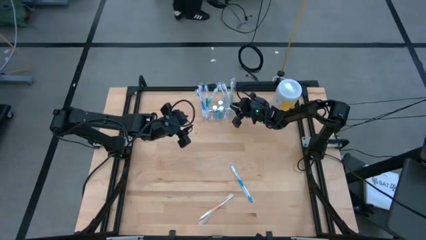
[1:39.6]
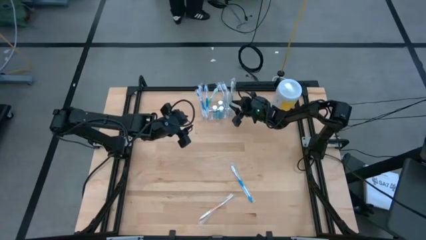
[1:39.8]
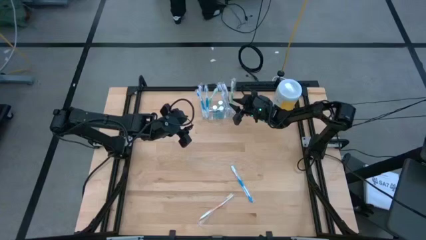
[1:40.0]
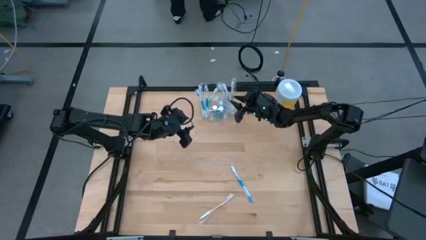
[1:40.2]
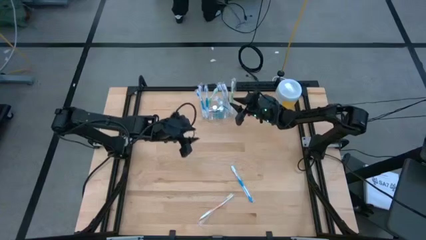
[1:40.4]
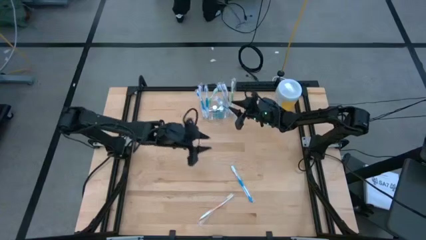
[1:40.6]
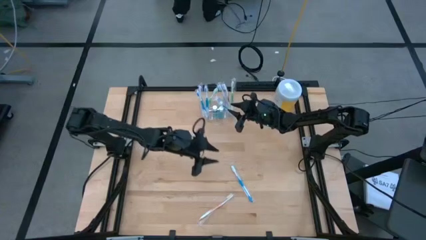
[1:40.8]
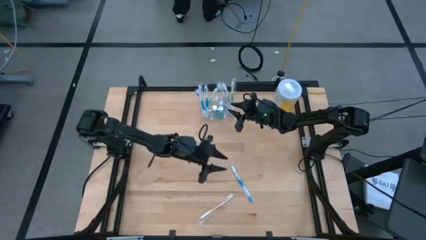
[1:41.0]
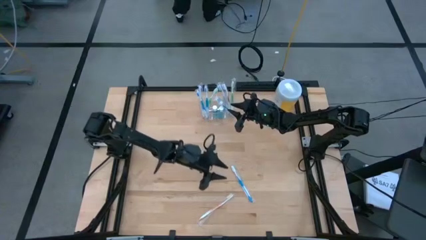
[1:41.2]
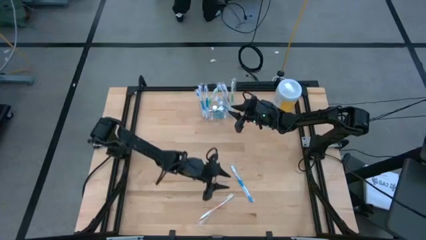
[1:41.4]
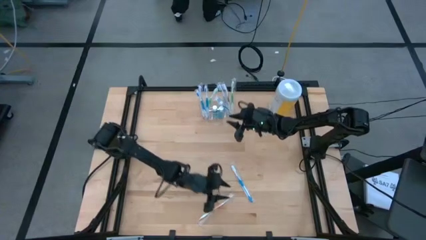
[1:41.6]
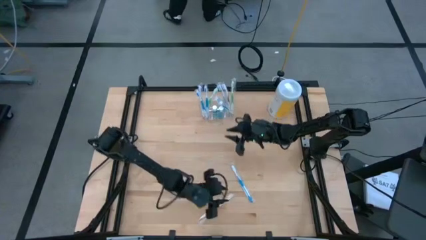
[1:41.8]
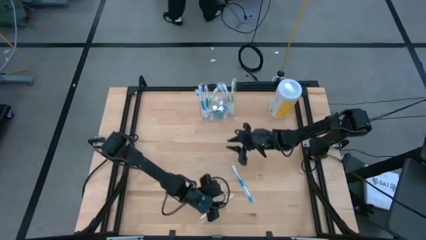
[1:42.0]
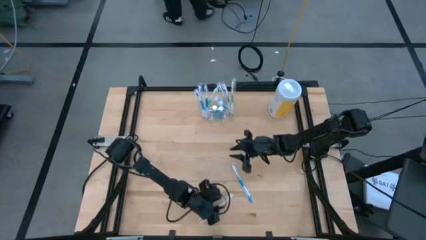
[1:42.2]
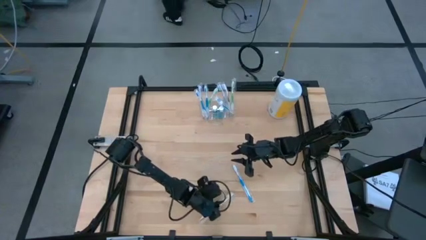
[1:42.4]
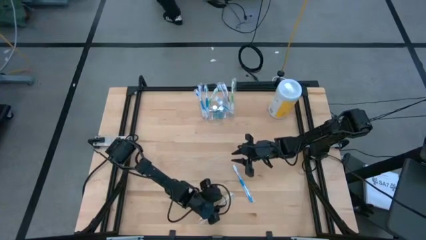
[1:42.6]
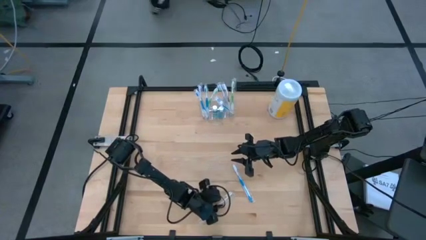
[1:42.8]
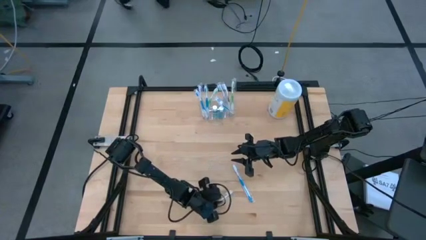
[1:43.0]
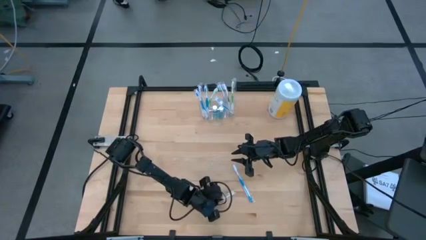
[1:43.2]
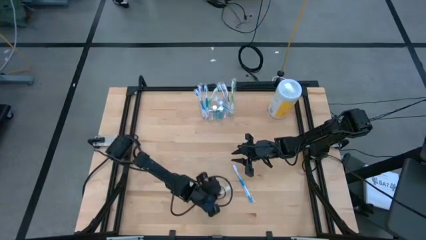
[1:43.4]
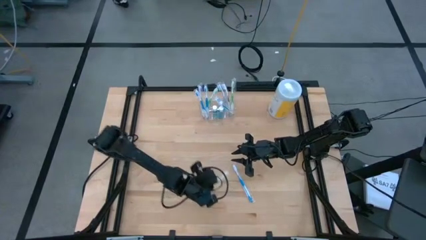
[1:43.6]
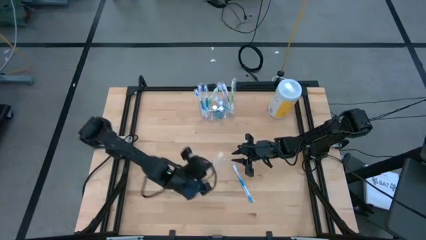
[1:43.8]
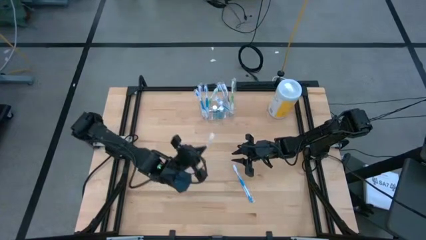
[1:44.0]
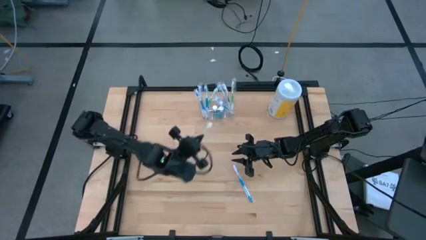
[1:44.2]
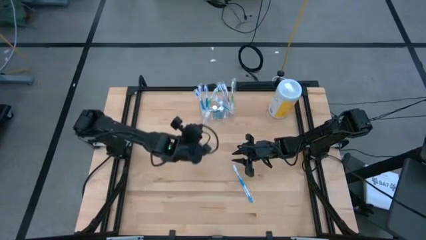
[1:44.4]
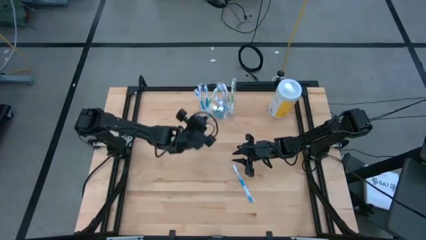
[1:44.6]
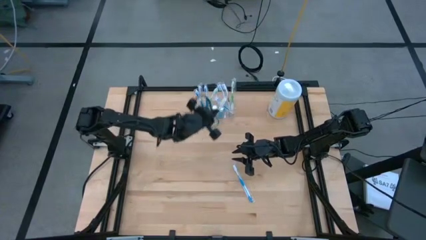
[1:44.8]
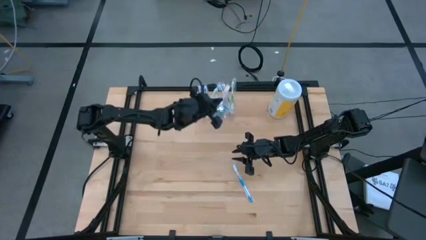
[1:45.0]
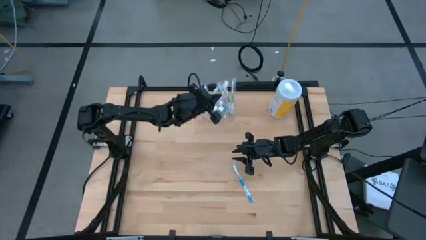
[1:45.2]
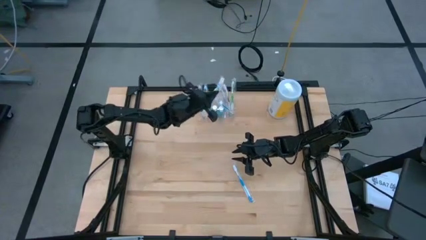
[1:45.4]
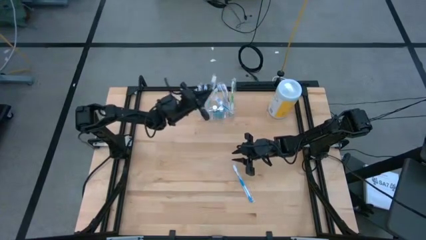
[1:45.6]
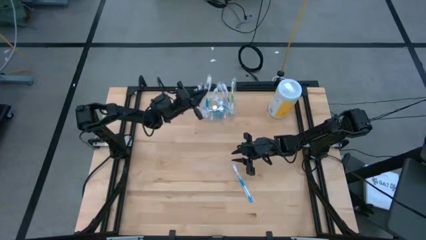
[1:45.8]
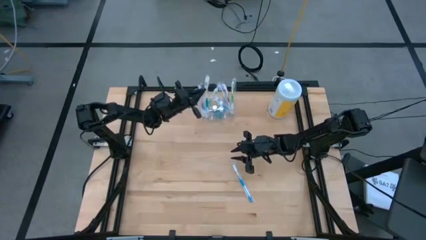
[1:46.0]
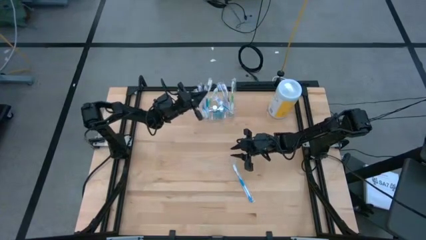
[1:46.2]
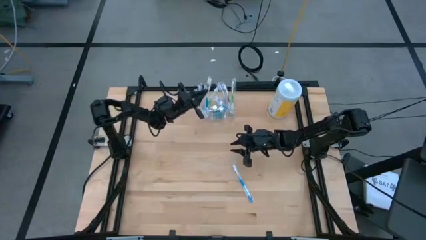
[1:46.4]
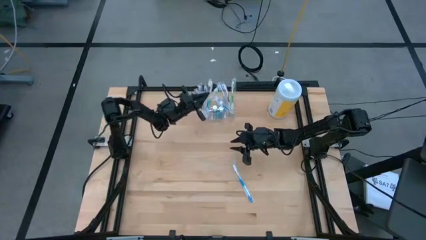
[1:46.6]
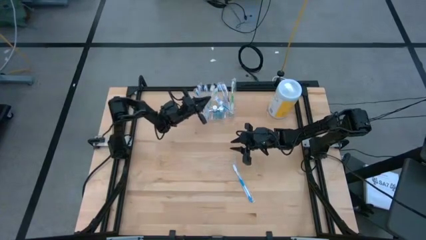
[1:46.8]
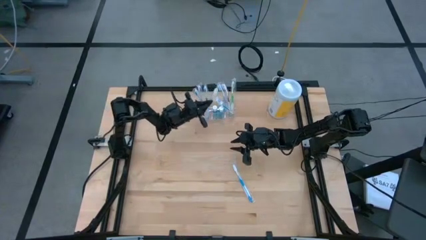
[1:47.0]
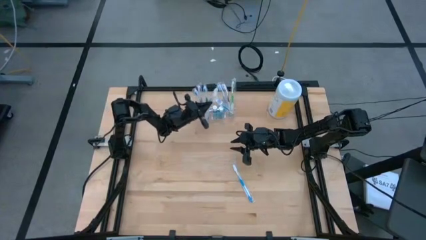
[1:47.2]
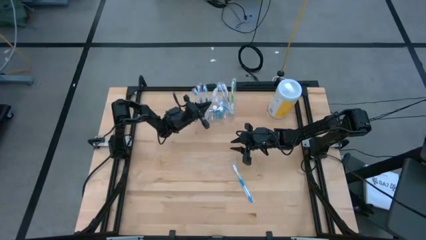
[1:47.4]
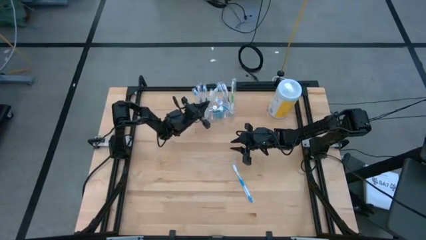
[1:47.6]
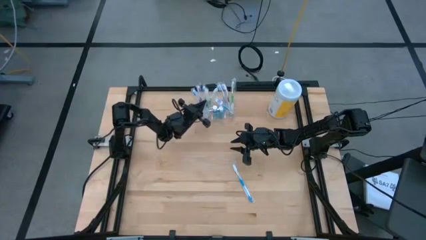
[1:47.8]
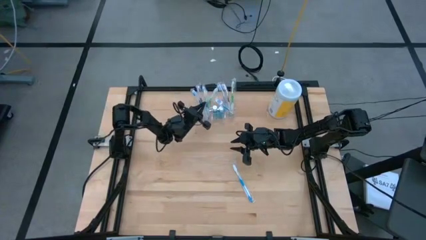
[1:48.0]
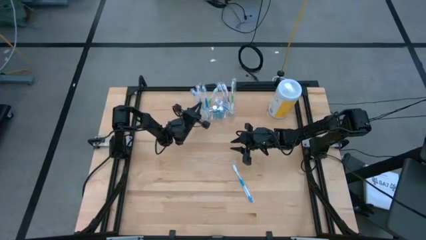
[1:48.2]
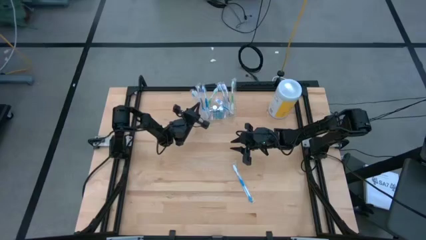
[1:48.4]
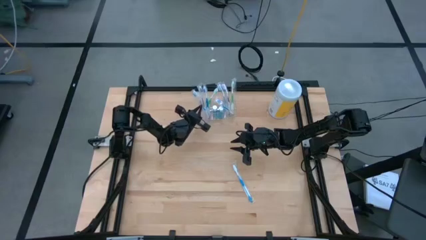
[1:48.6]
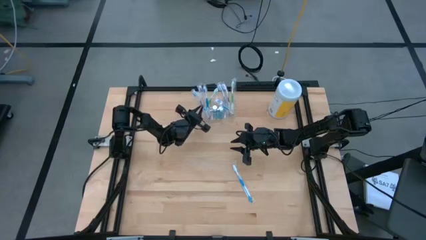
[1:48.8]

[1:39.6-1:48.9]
Task: Pick & Place toothbrushing station
Put the orange toothbrush into the transparent organizer

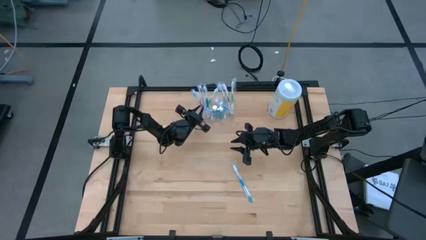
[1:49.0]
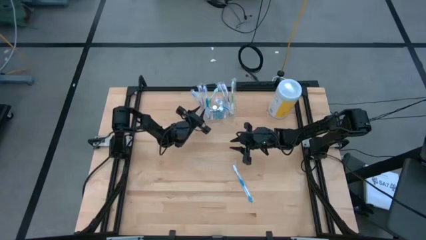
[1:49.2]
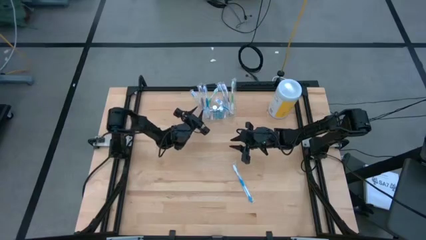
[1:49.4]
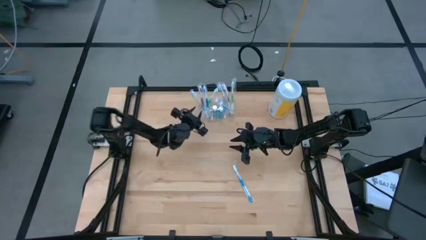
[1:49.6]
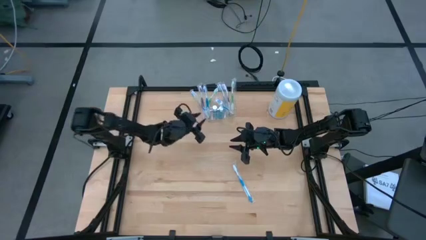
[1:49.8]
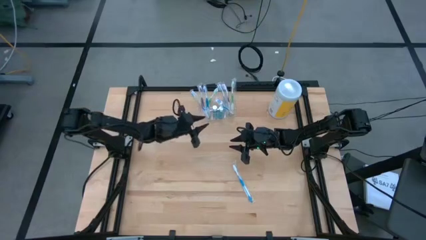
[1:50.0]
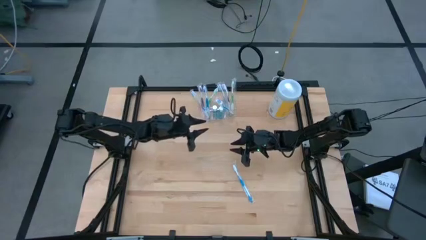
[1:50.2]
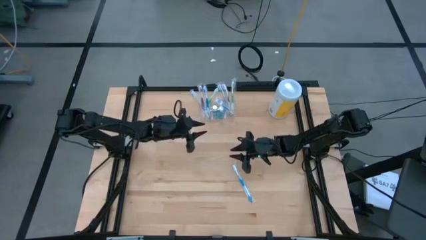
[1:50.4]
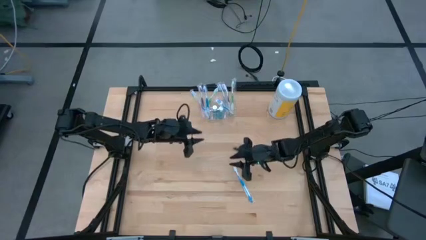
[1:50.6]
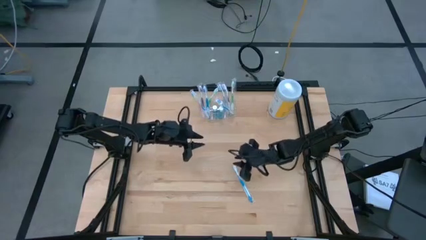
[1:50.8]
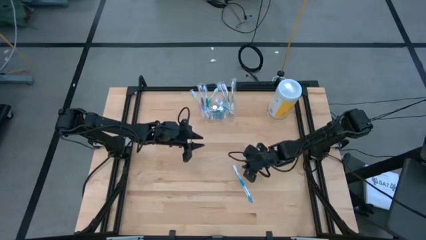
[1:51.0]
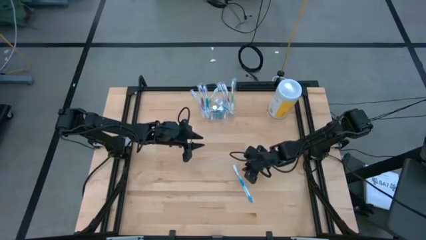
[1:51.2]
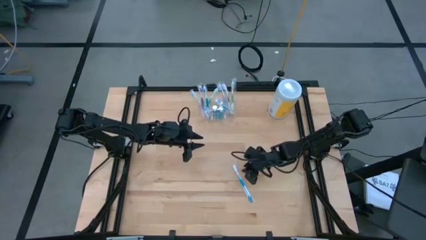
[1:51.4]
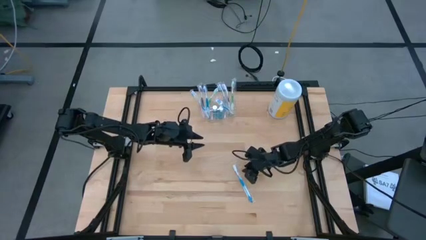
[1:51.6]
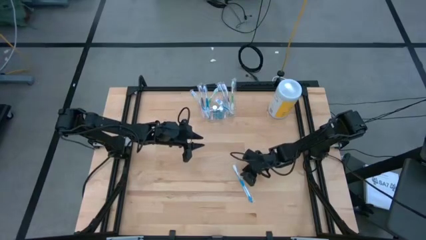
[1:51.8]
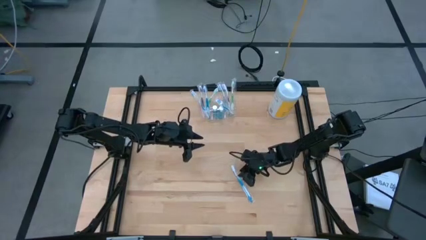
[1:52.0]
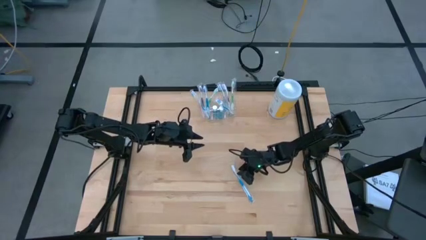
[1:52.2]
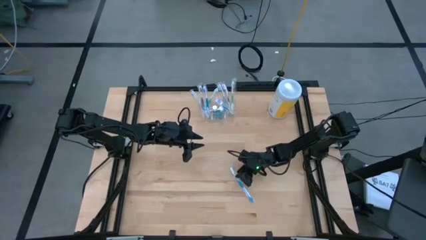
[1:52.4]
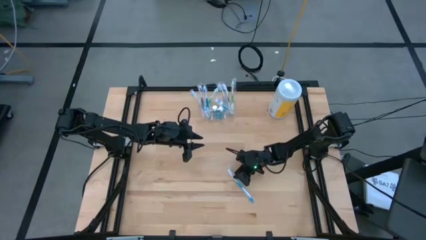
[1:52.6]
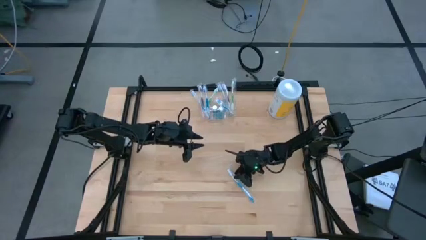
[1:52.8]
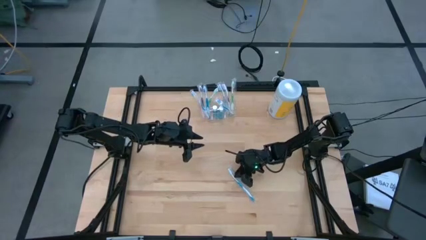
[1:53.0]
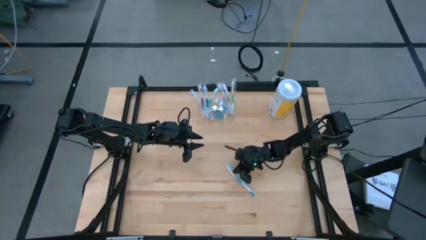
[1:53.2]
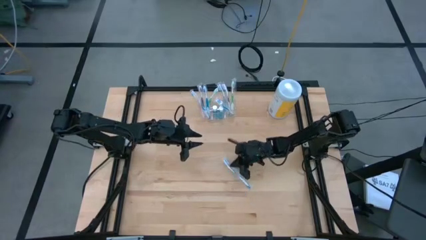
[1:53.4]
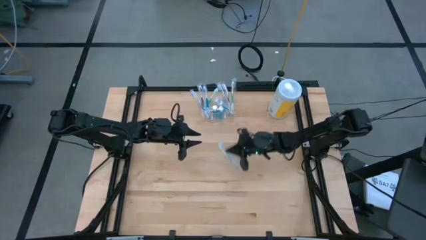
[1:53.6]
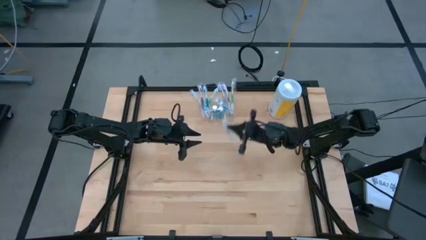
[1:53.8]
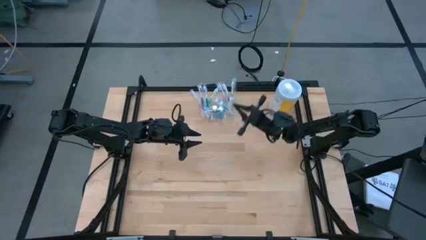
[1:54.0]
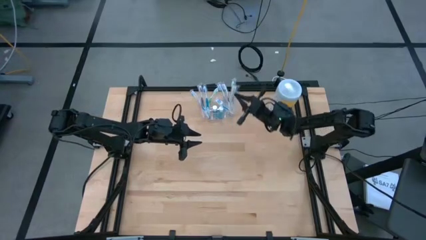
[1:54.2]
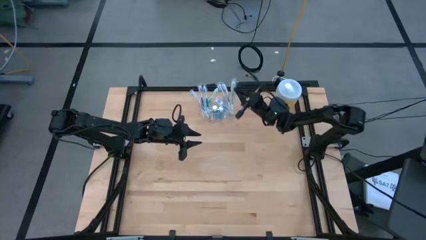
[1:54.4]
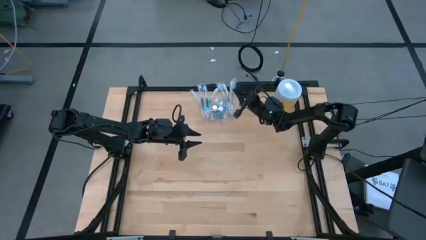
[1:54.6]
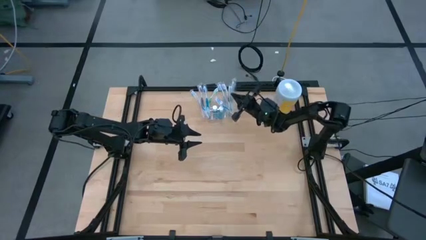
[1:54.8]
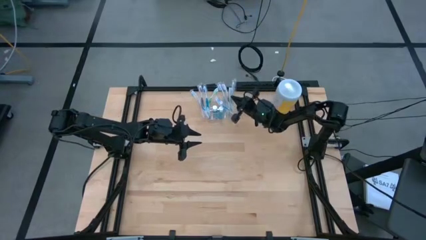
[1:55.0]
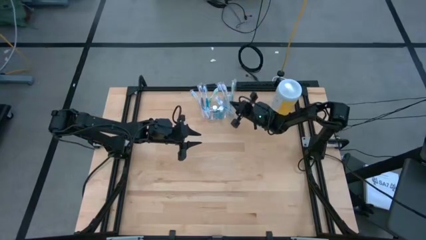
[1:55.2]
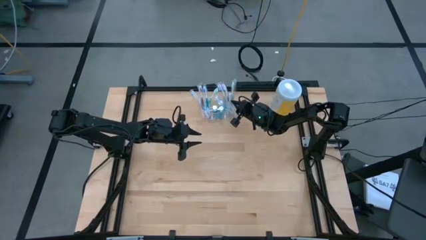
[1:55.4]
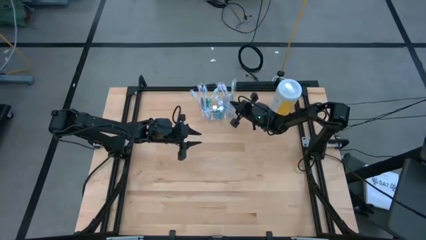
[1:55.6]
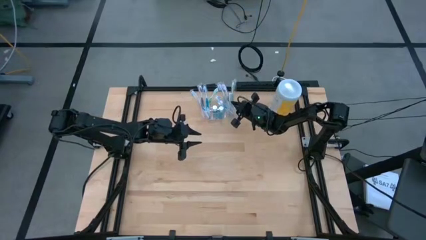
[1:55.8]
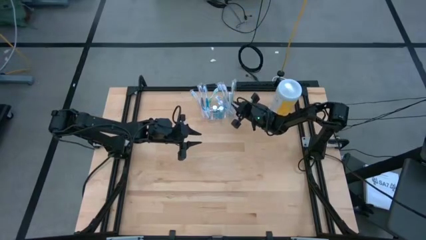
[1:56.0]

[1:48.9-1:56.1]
Put the blue toothbrush into the transparent organizer
